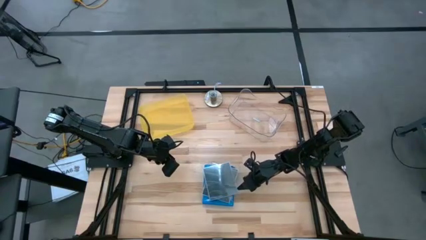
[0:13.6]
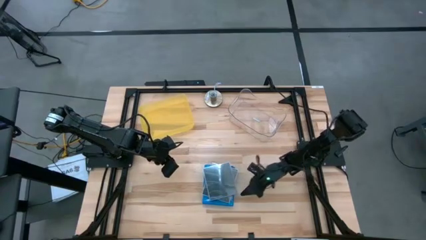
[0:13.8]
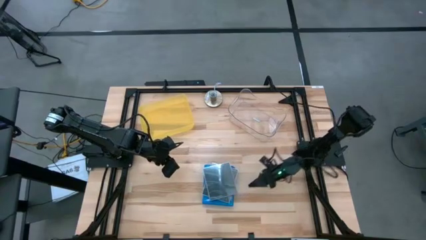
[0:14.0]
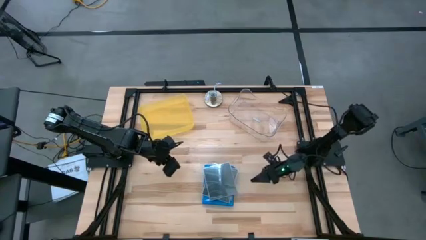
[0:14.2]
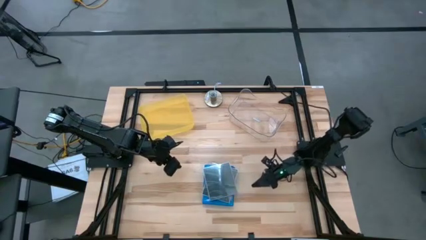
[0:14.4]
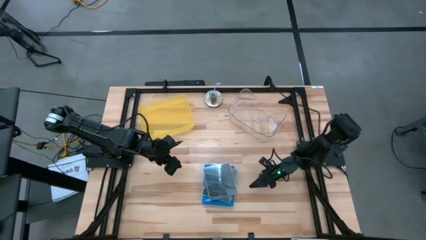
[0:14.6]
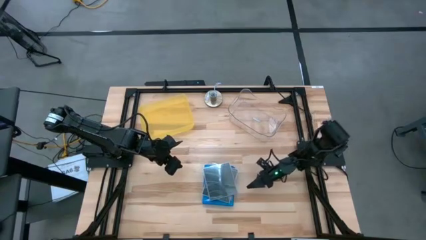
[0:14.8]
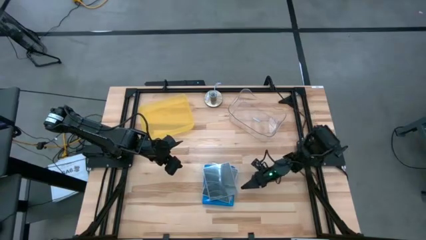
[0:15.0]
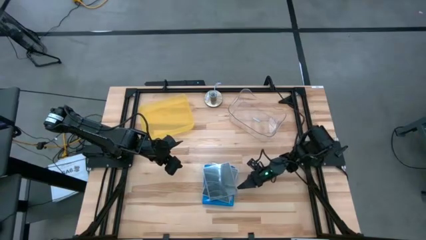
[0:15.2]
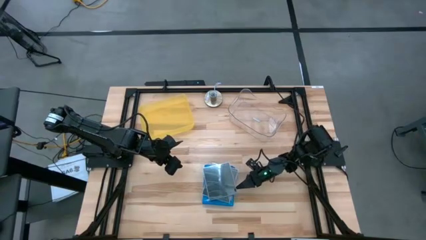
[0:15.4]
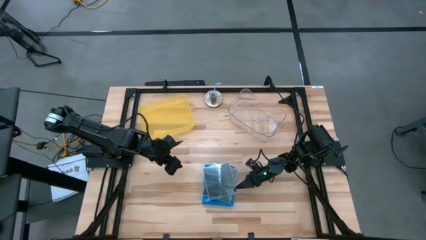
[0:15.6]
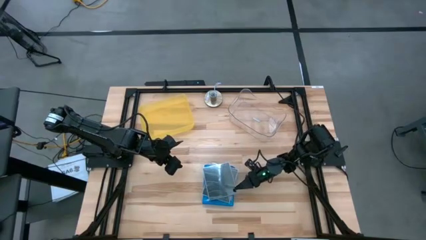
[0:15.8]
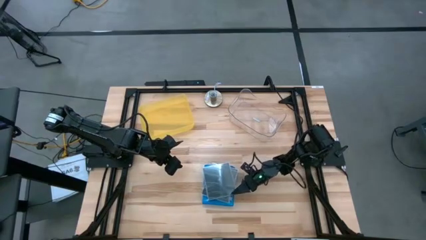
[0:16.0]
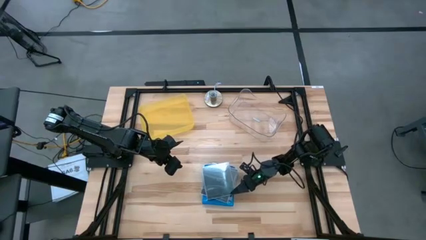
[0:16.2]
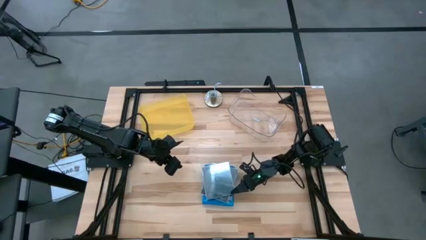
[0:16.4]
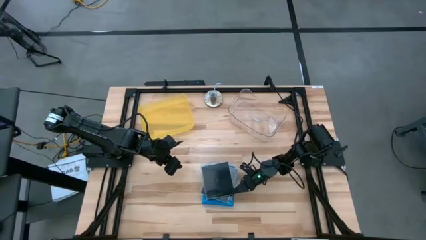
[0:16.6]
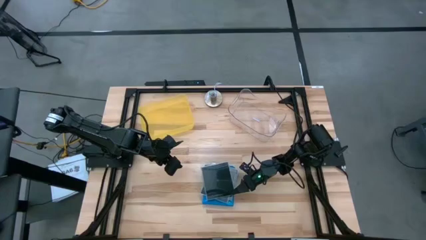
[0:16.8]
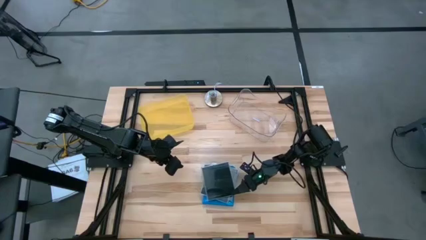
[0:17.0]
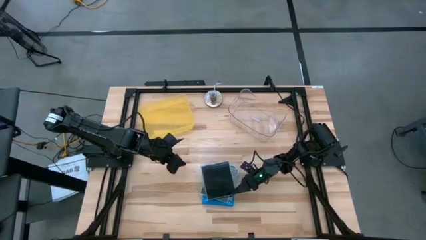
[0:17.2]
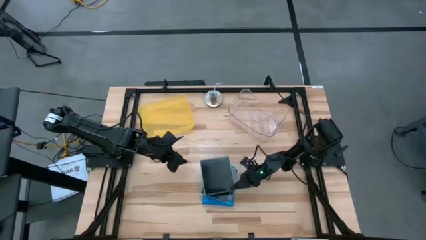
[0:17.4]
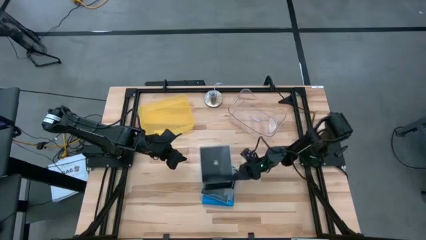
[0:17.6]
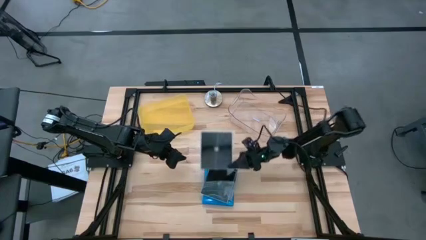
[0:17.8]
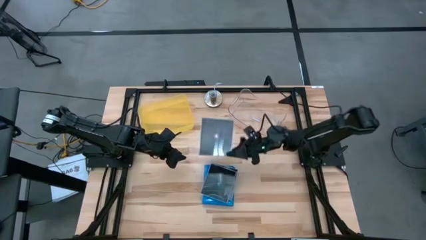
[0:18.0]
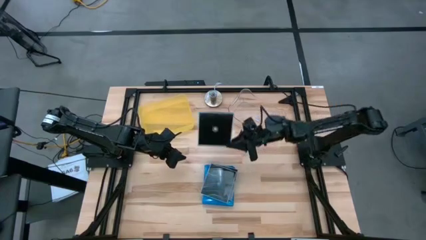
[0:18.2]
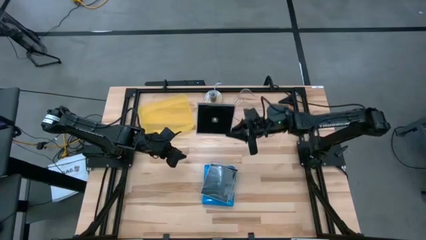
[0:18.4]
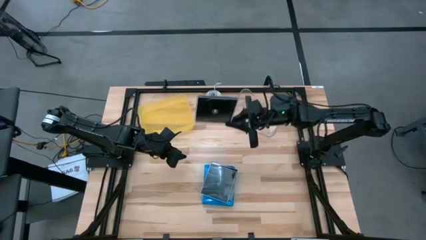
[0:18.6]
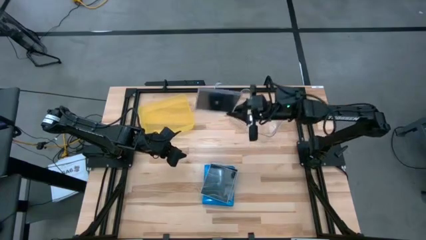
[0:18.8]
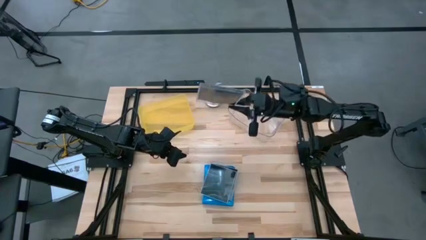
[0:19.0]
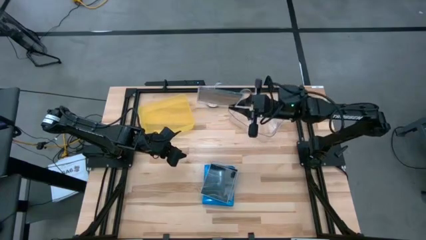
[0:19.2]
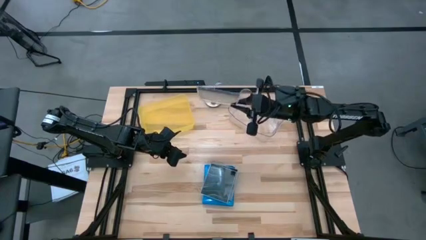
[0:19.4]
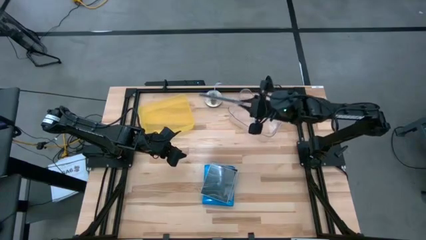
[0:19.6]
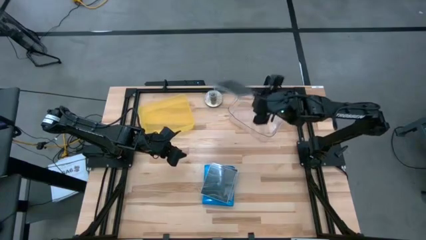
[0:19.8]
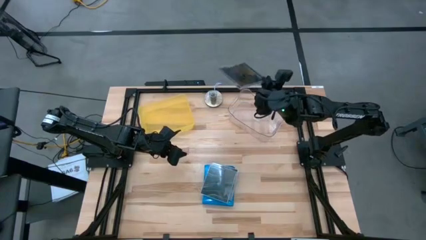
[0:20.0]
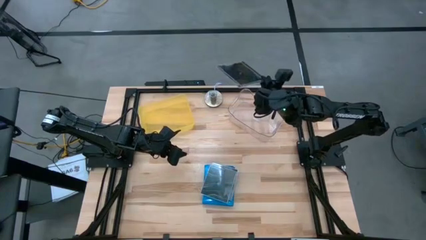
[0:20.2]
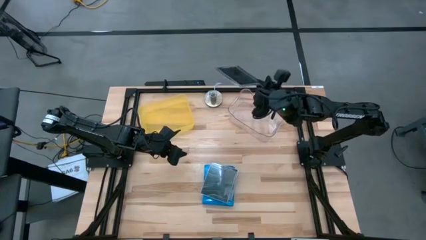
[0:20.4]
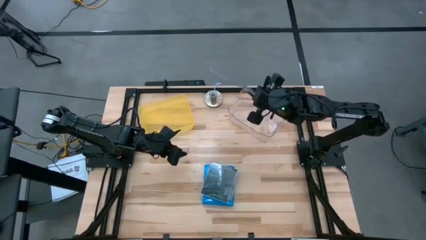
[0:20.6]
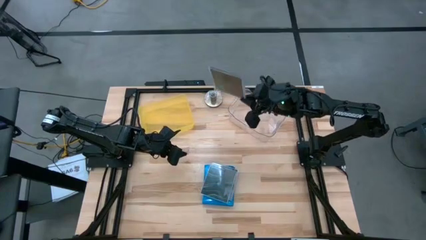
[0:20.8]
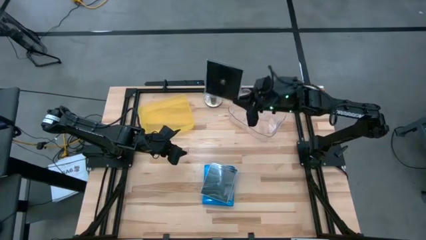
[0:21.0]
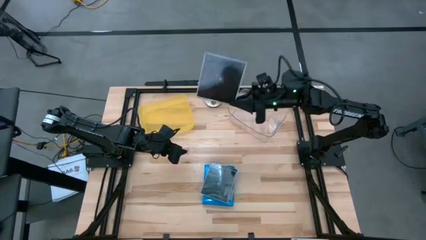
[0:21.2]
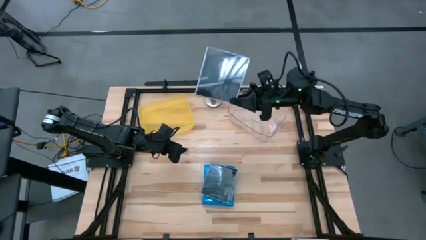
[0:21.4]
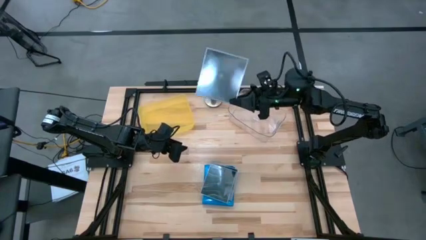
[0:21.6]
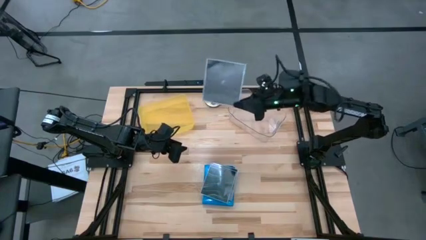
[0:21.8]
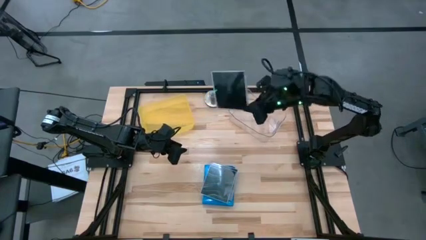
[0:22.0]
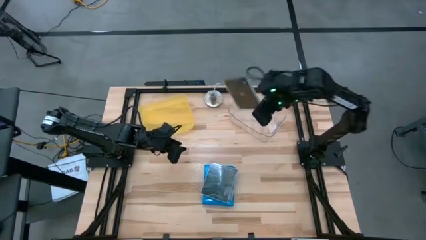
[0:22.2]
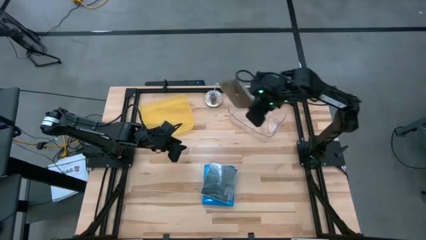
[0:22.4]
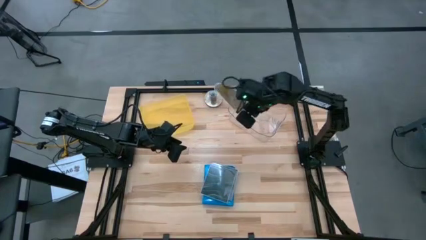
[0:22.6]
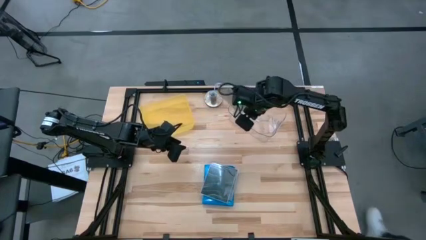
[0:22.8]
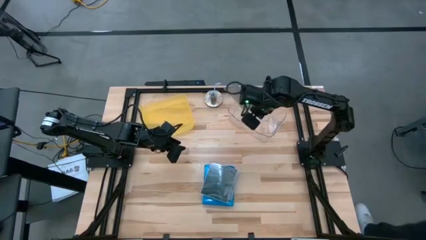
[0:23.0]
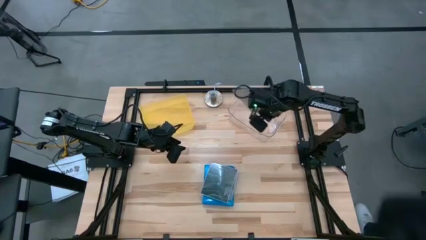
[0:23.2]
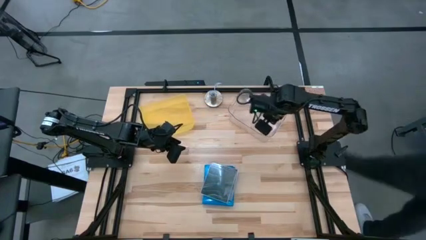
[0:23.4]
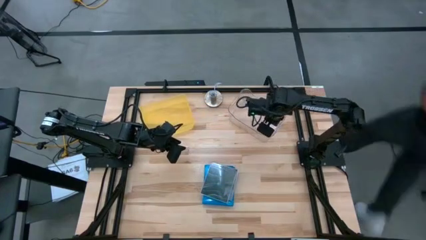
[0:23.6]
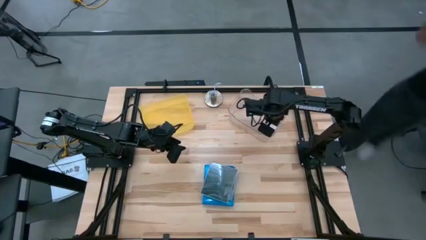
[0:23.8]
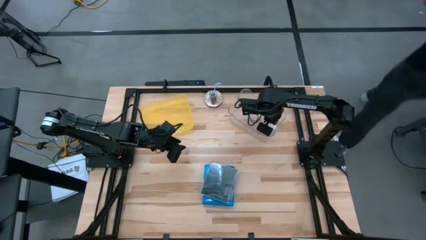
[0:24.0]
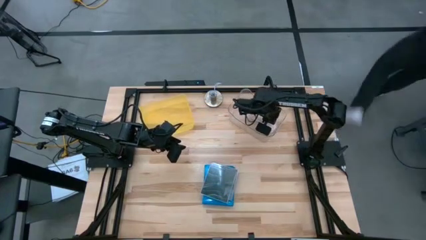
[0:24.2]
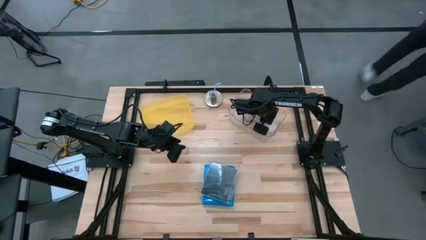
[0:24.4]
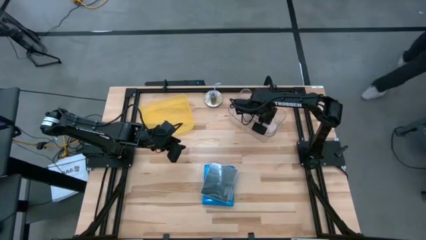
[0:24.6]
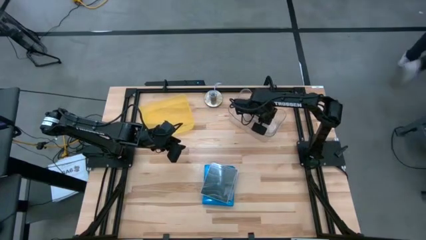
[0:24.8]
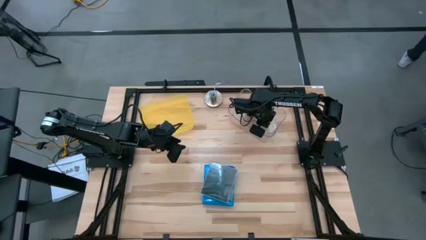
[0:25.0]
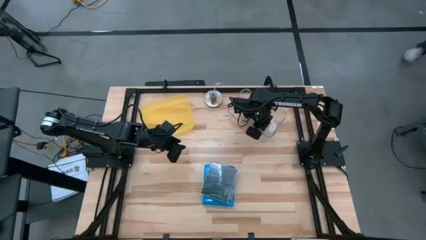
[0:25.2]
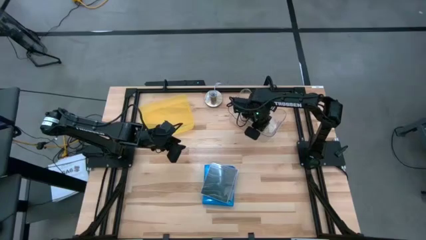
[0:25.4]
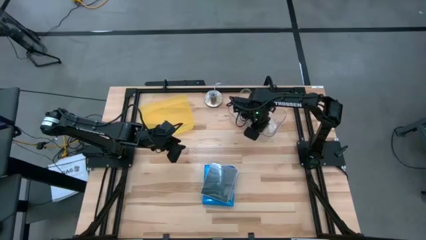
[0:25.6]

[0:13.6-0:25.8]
Task: Pick & place jewel cases by type
Put the black CD case into the transparent bin
